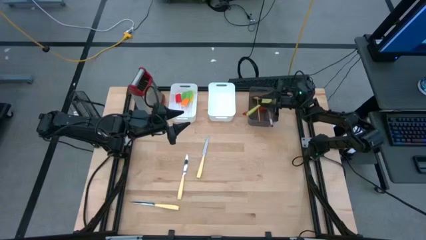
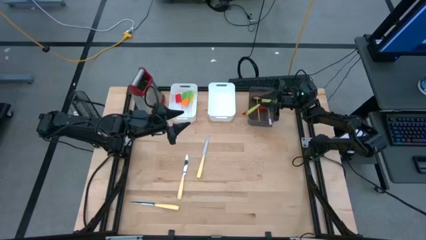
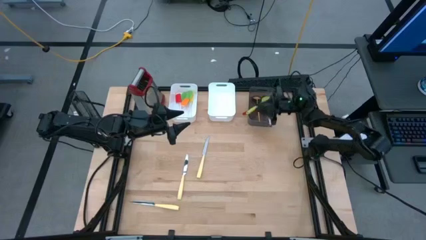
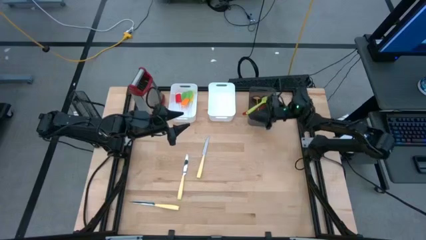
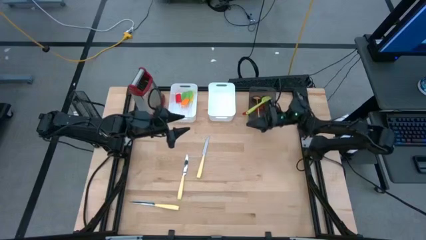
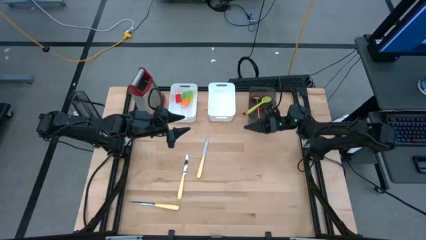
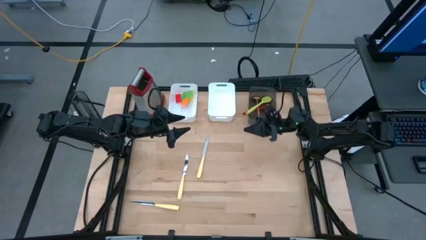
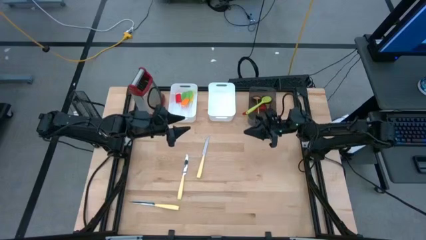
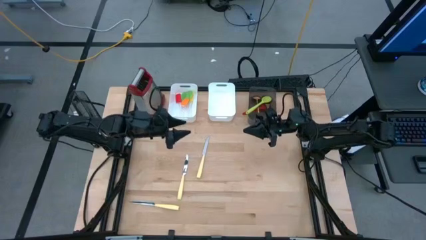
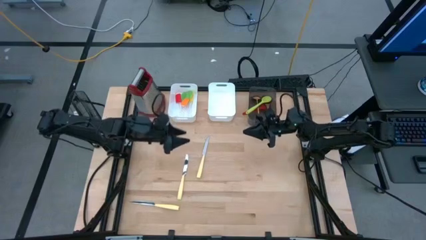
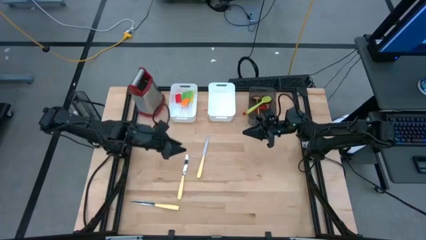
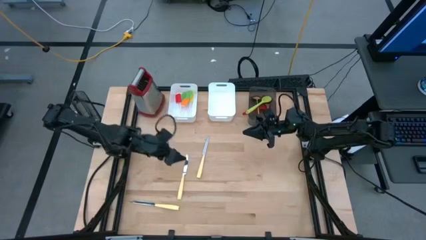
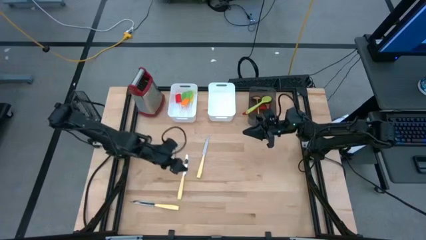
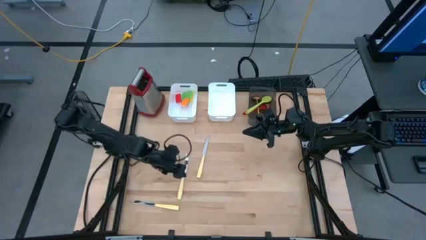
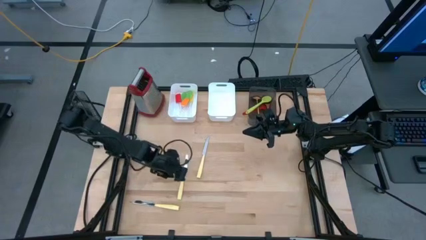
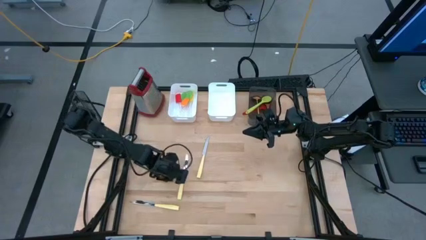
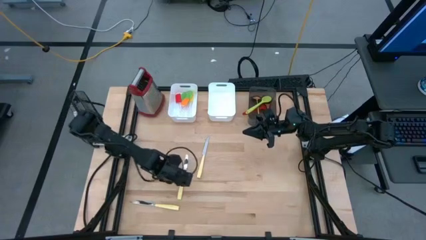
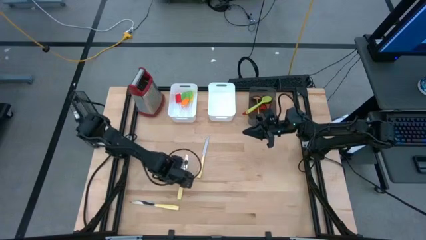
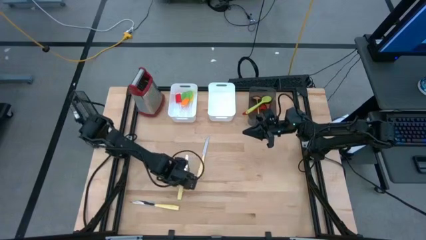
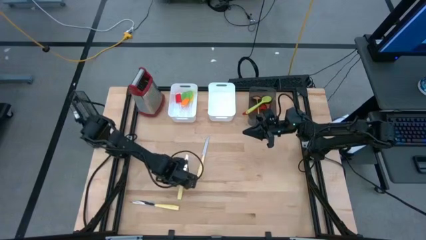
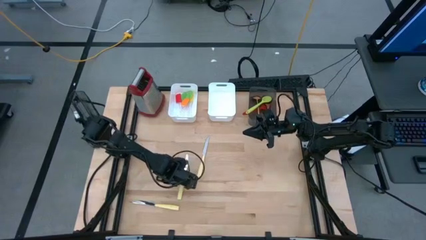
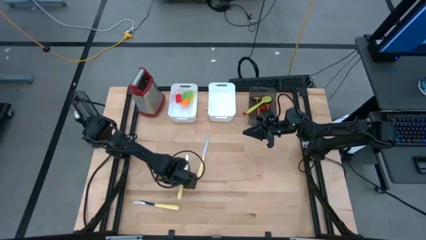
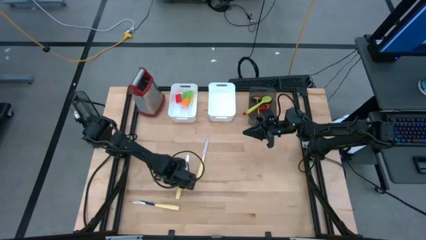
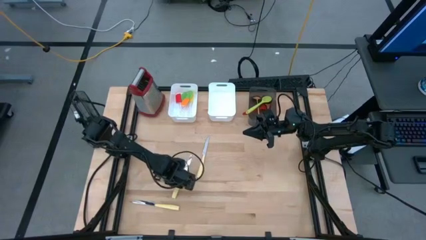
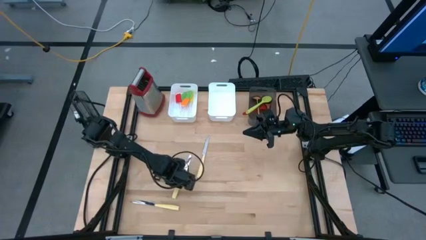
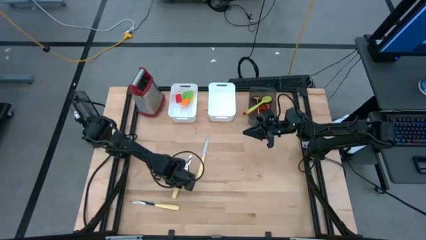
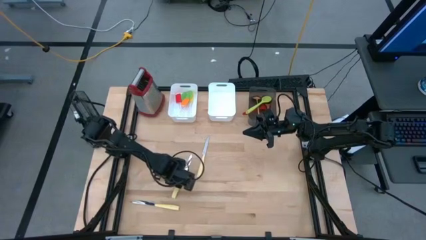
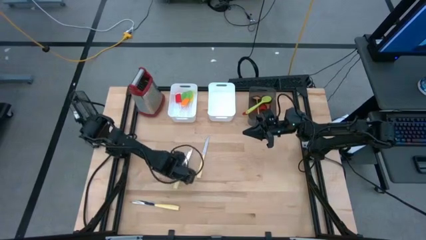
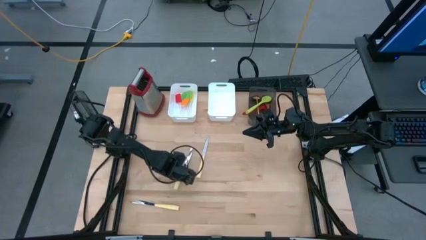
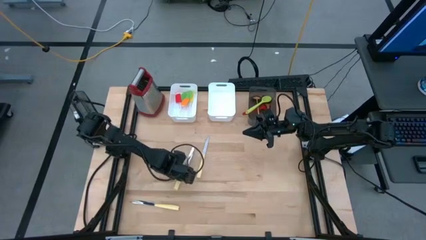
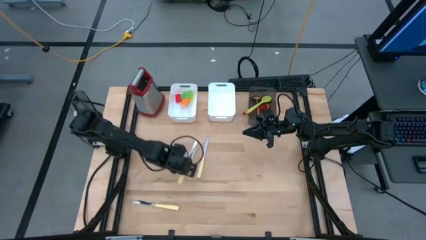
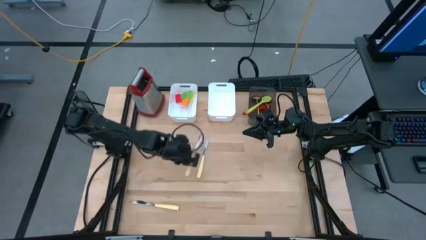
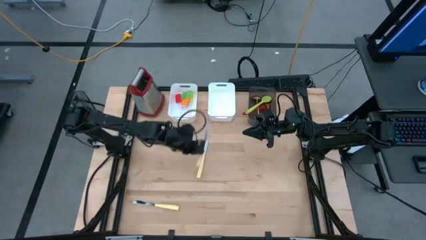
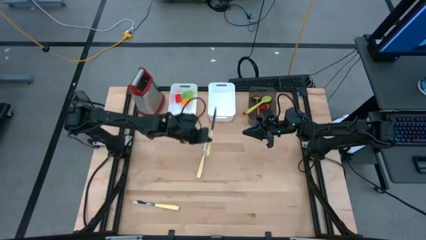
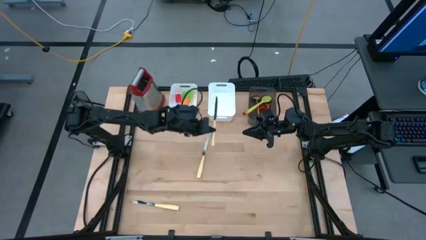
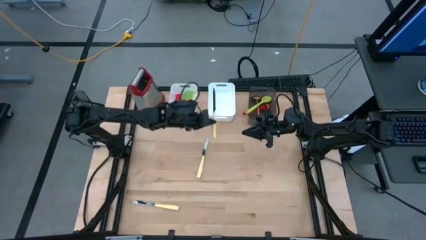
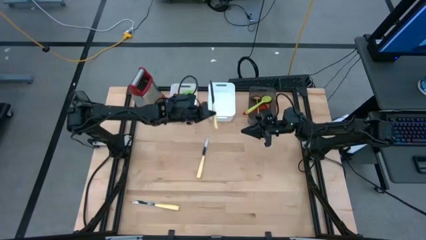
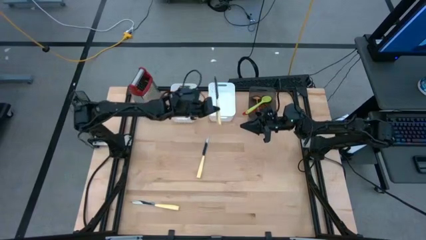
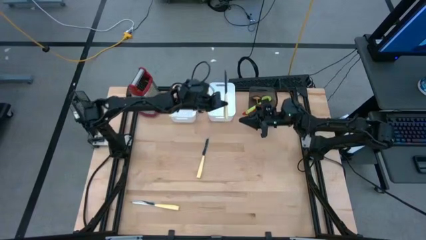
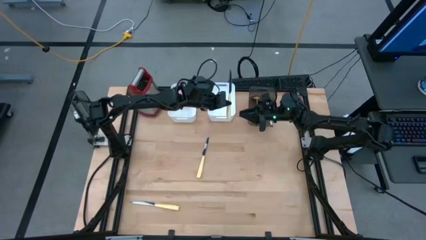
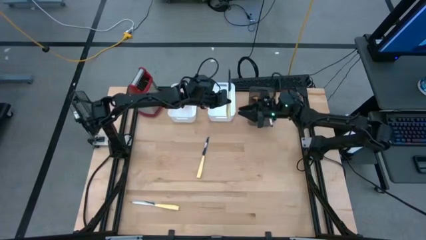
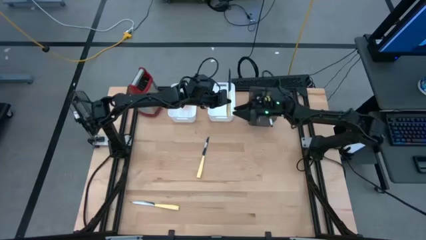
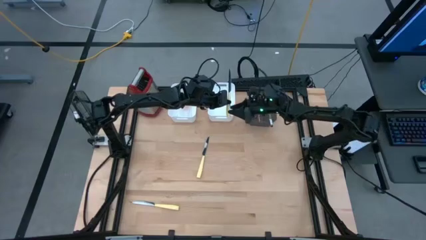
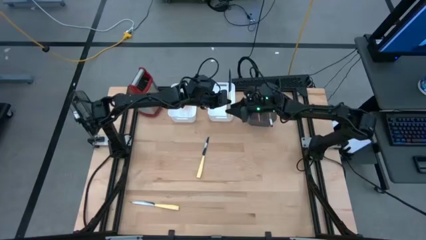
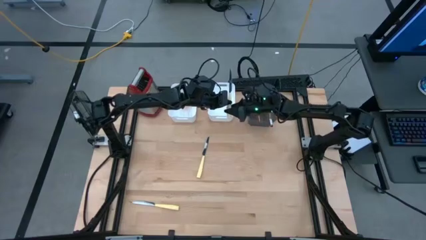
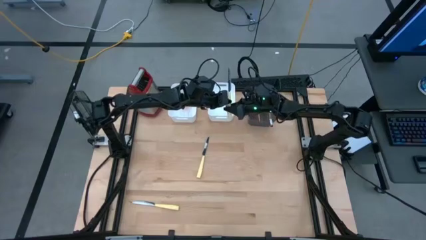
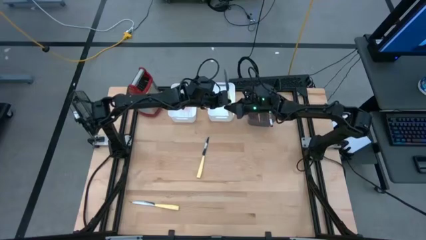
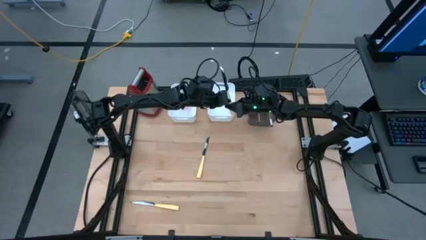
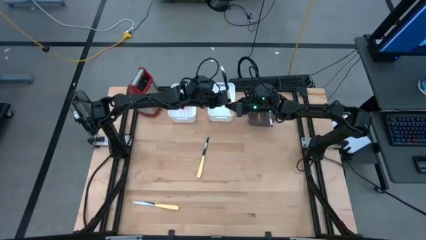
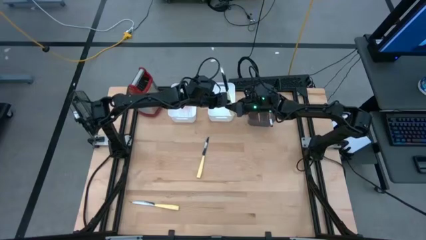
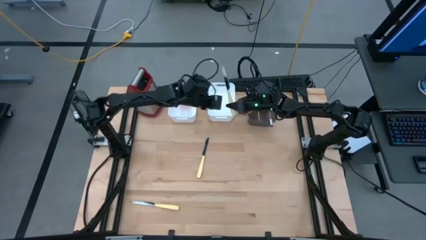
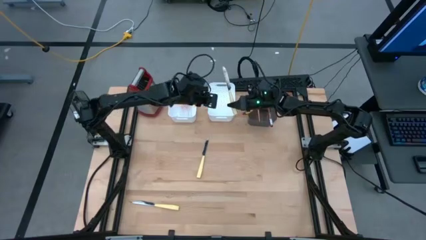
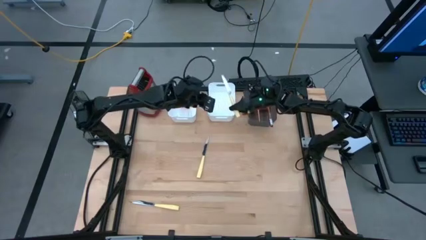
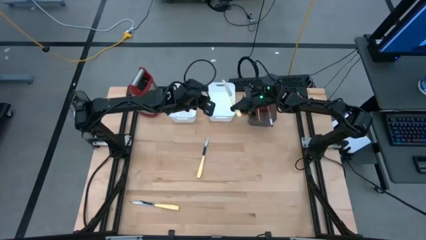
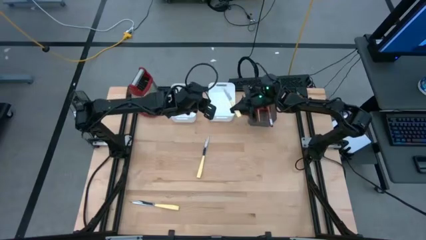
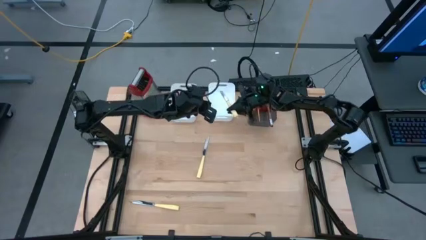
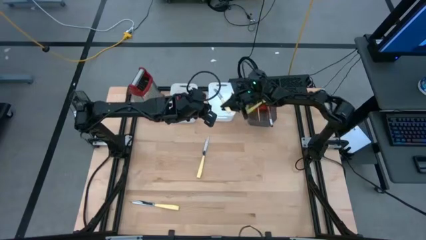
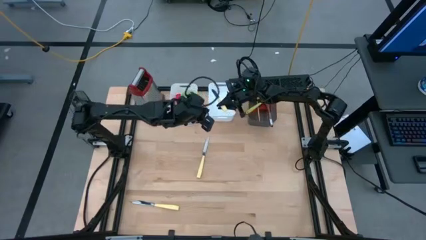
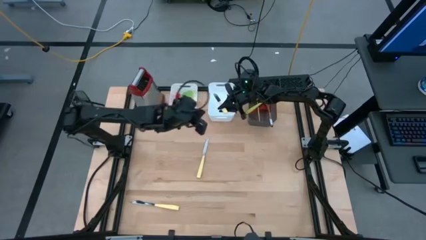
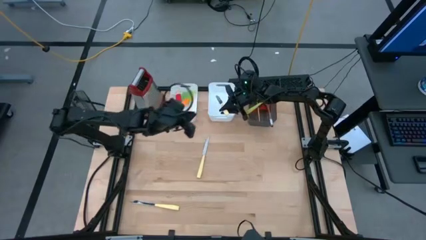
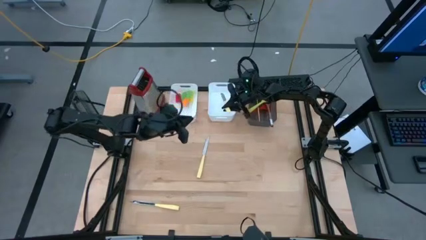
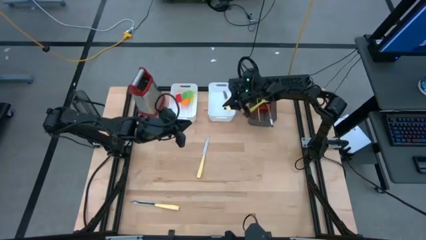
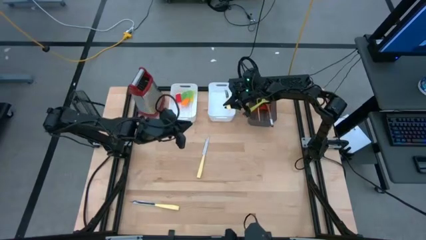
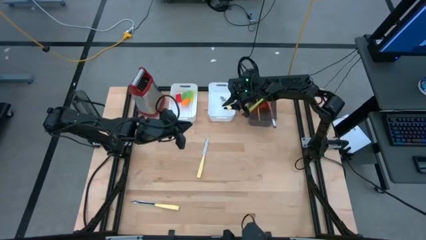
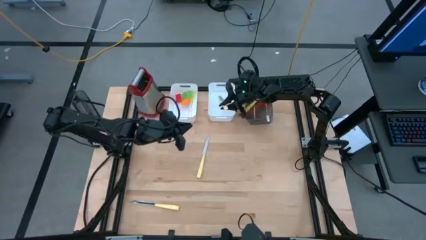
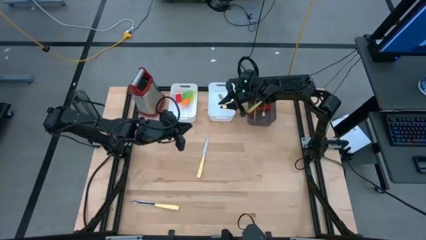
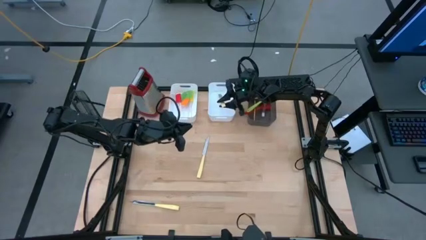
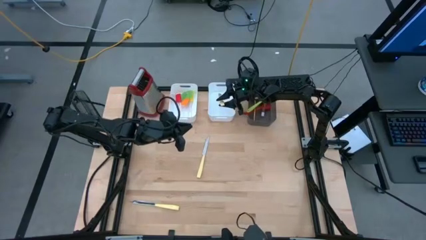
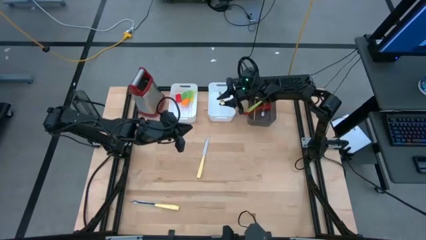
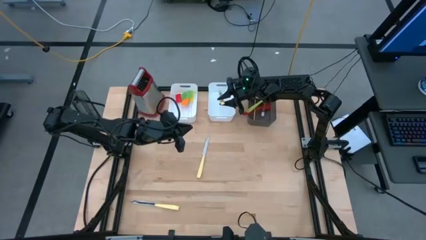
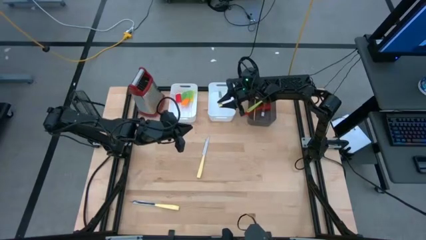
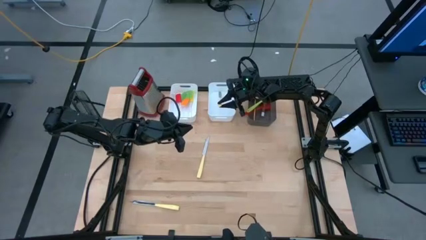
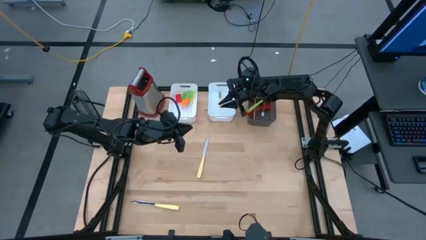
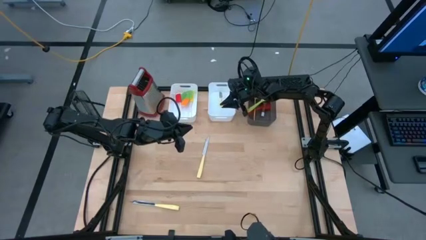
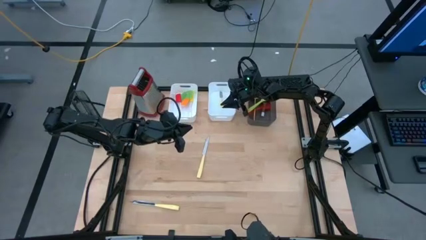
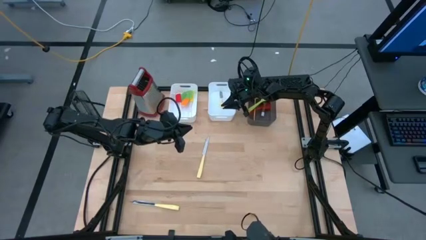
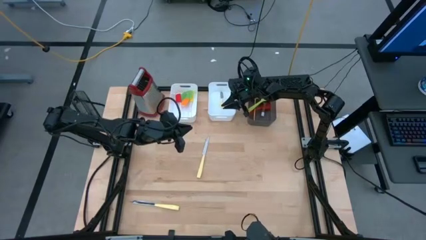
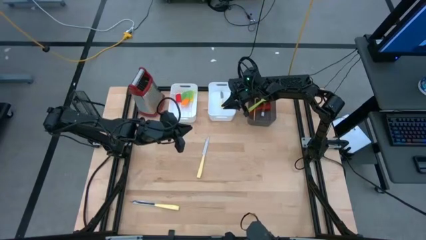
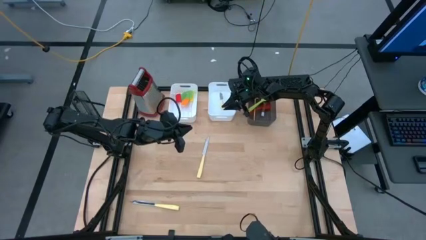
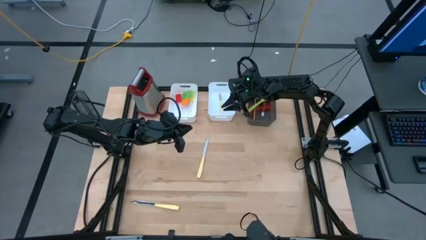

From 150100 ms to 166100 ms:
Task: Pick & Place Kitchen Items
Put the top left knife into the right white bin
